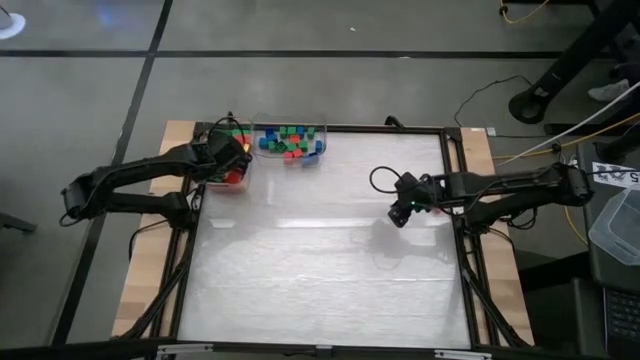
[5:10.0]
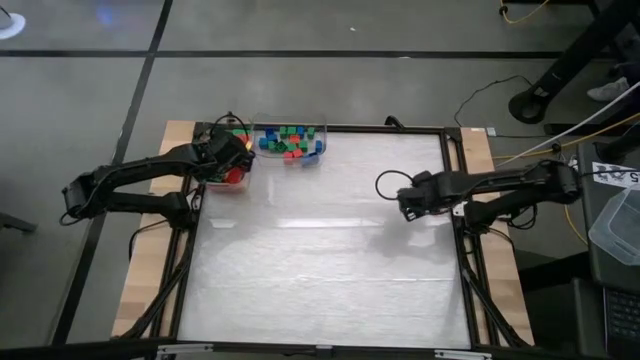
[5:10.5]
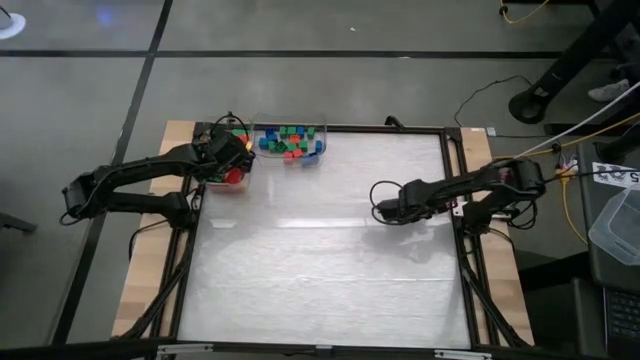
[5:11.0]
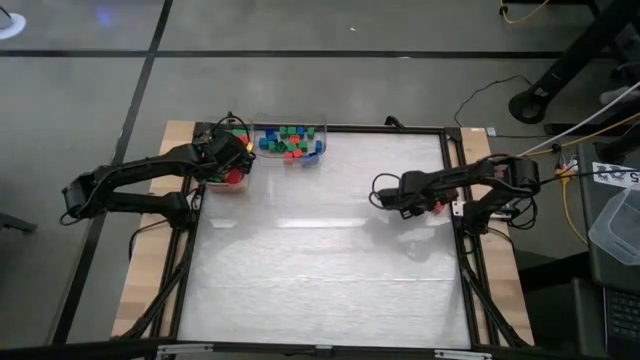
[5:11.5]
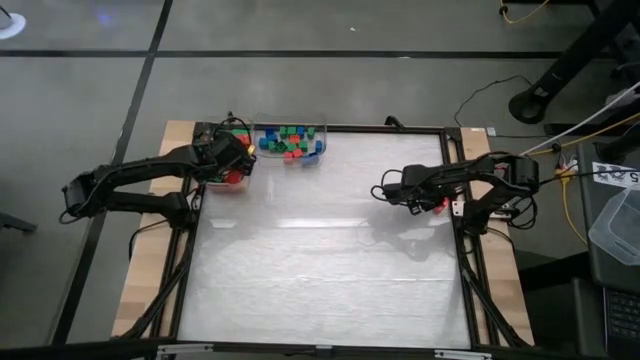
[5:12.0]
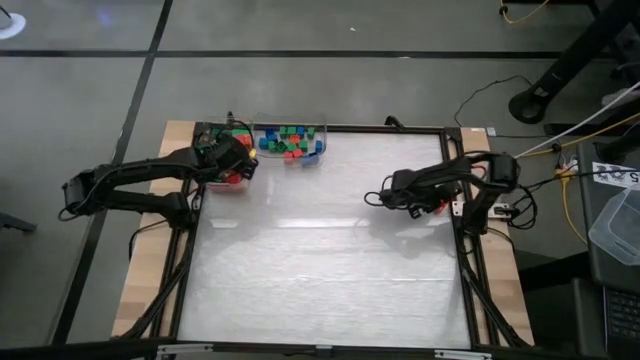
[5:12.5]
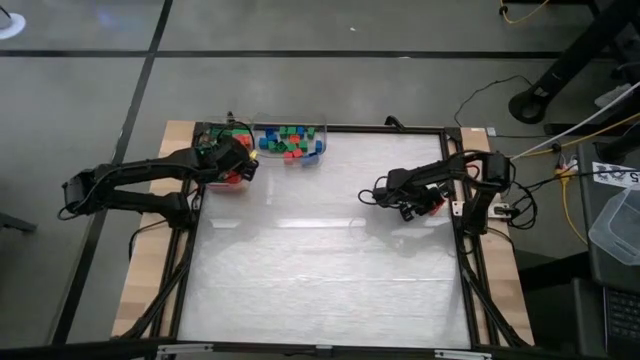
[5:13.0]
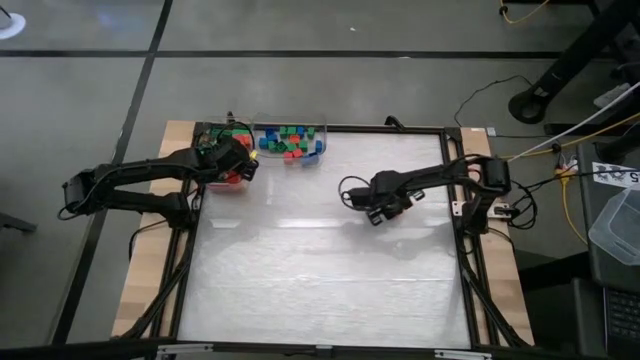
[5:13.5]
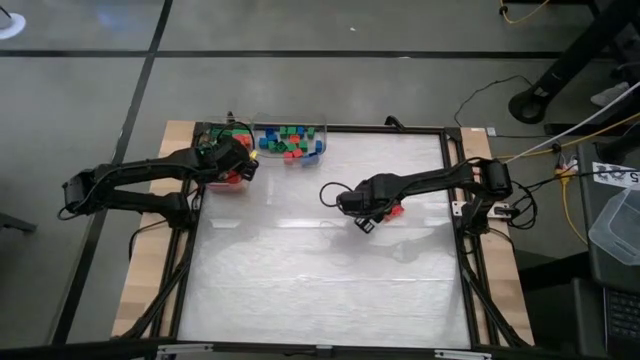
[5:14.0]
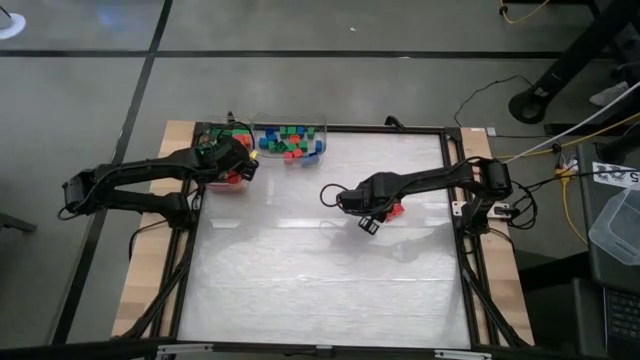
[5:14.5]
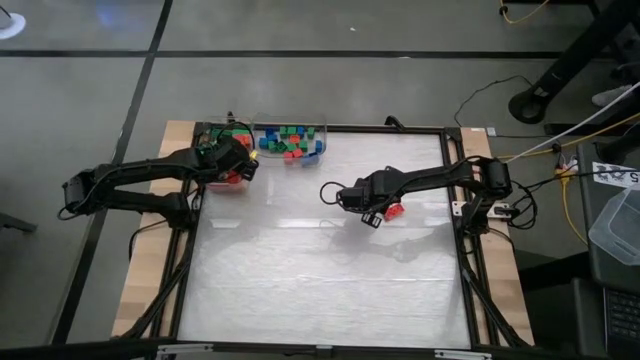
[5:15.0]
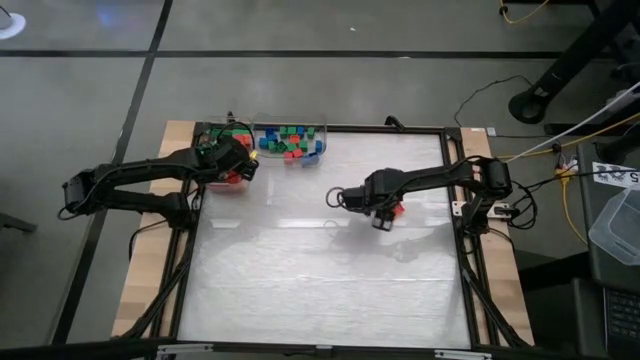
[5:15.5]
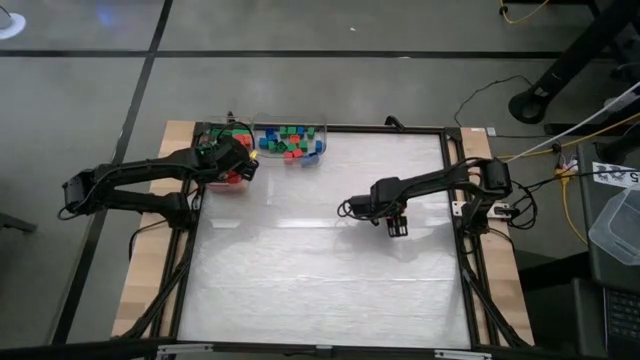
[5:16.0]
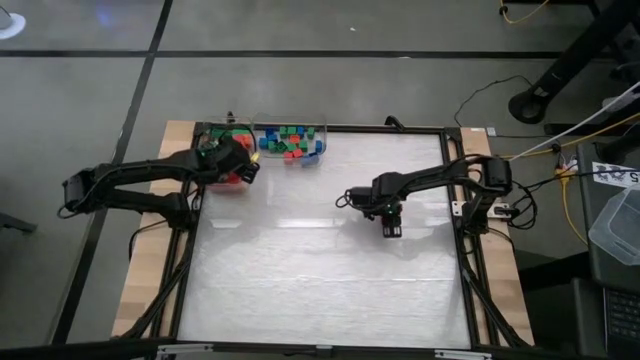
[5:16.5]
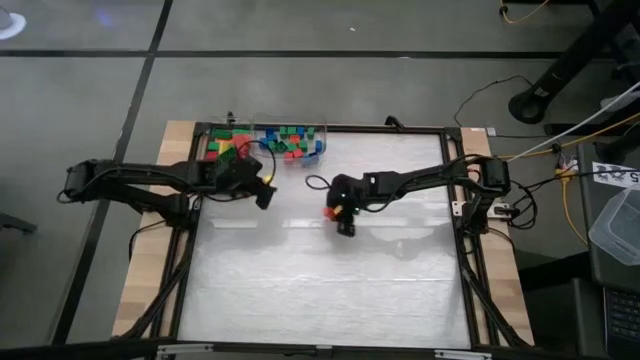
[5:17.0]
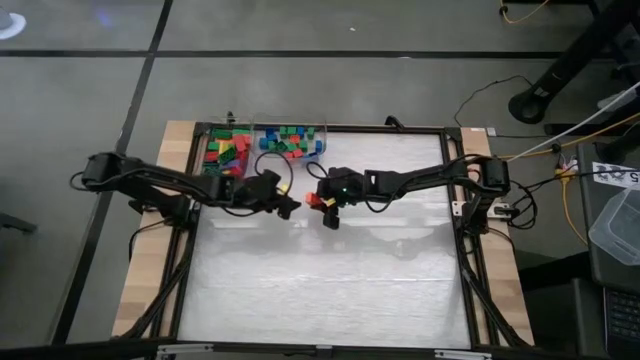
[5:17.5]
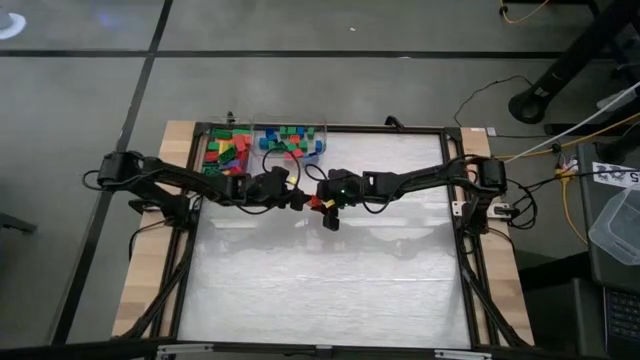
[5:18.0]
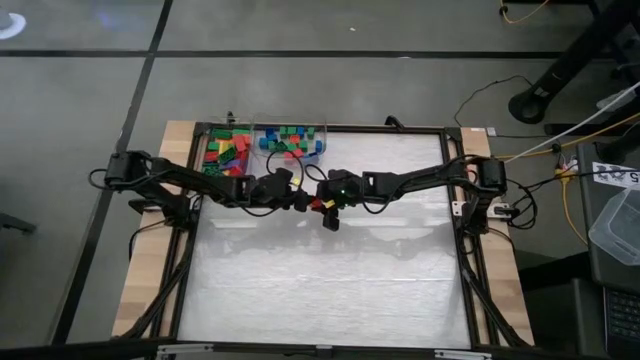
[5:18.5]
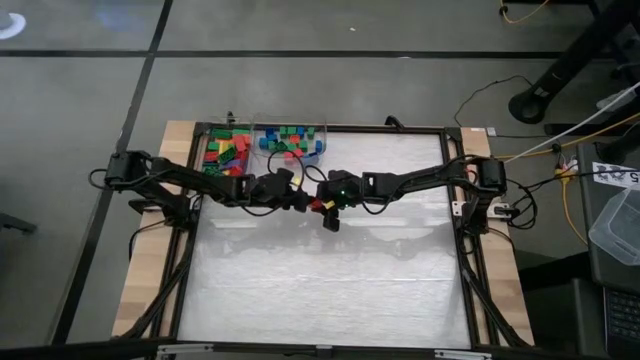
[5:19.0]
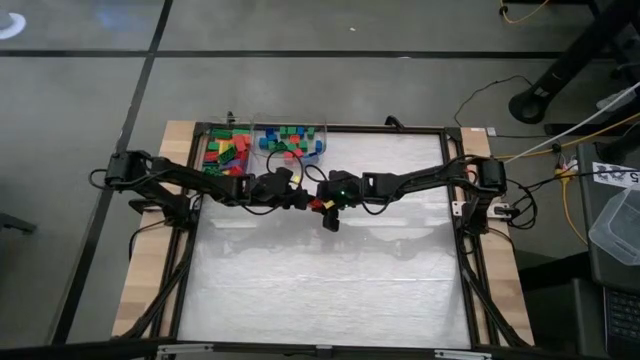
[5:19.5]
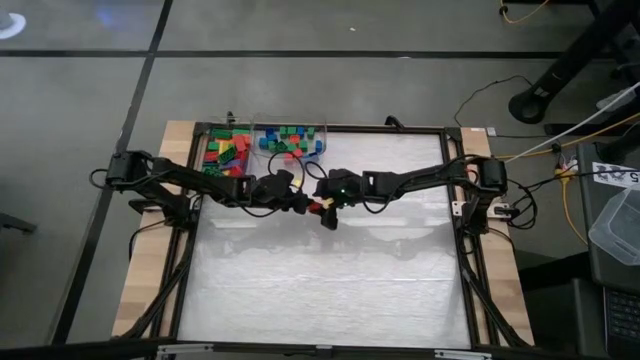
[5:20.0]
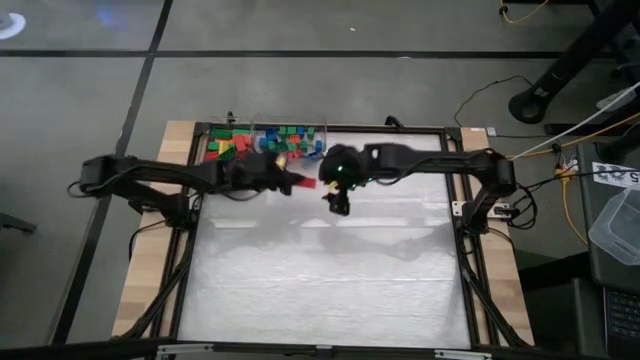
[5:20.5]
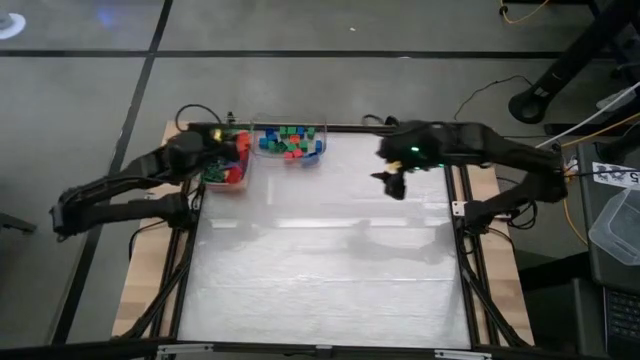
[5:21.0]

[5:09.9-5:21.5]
Task: Sort blocks by size
Put the large orange game piece into the left transparent bin

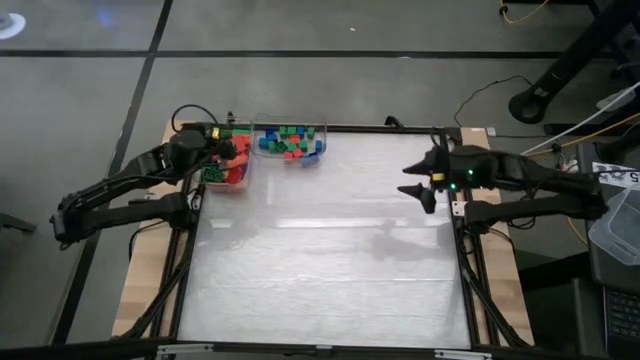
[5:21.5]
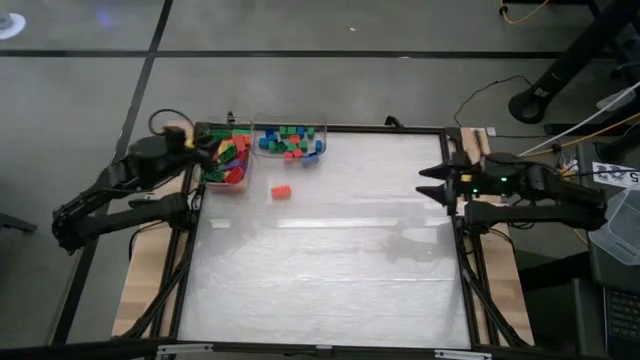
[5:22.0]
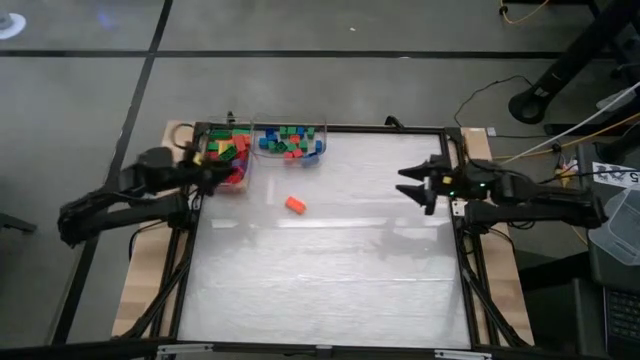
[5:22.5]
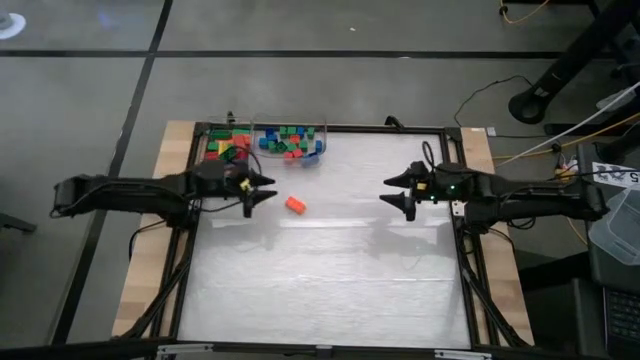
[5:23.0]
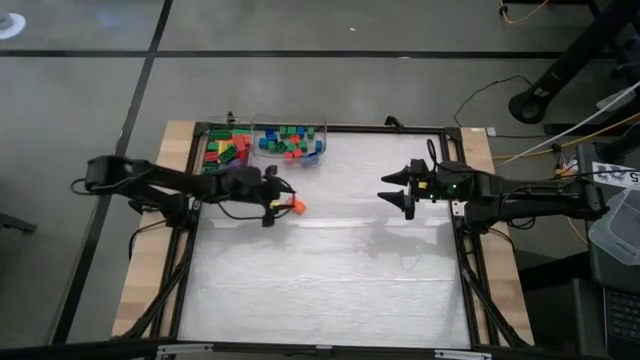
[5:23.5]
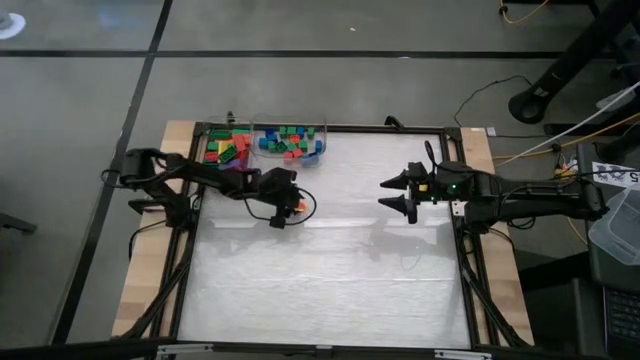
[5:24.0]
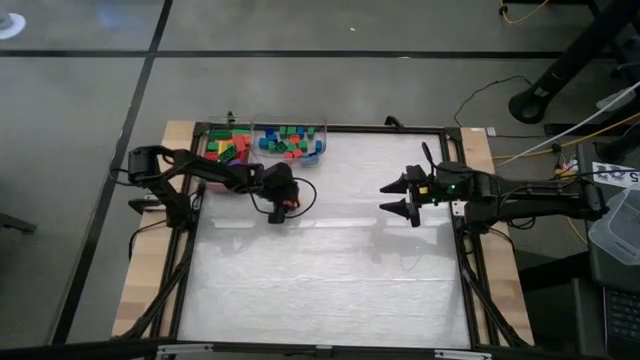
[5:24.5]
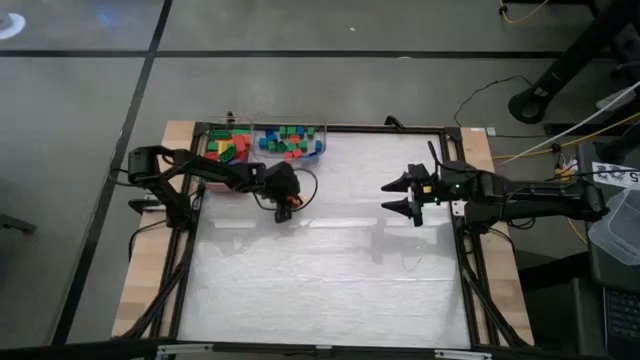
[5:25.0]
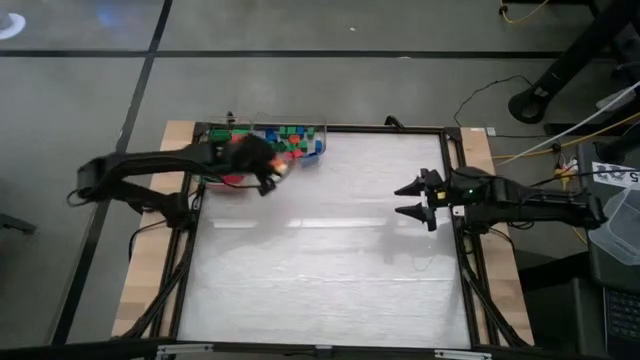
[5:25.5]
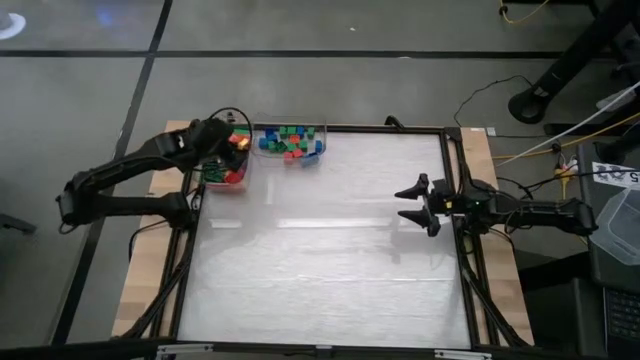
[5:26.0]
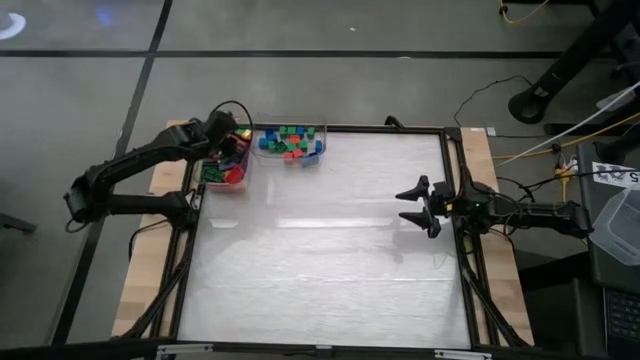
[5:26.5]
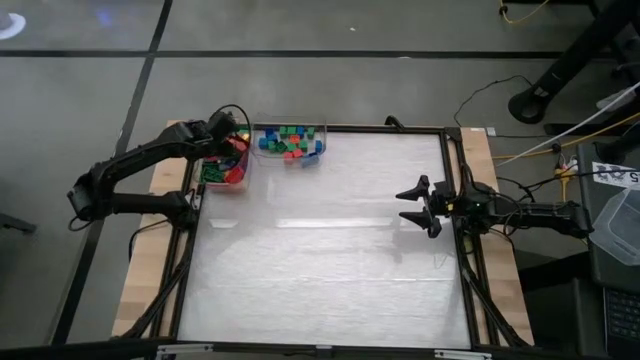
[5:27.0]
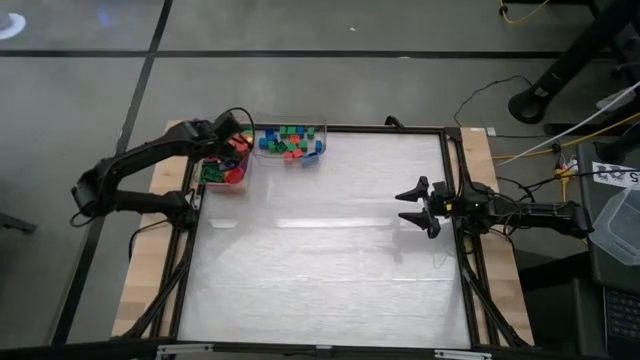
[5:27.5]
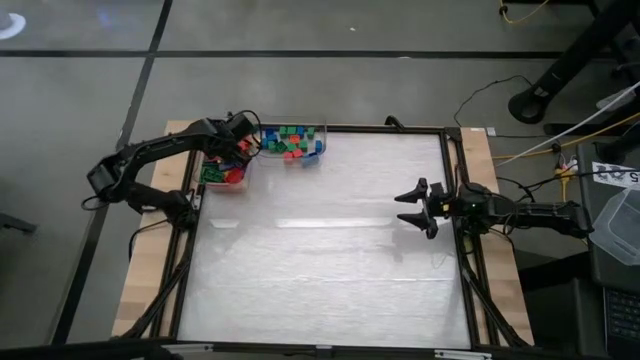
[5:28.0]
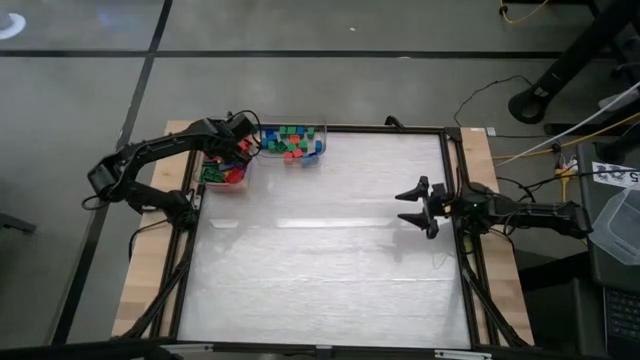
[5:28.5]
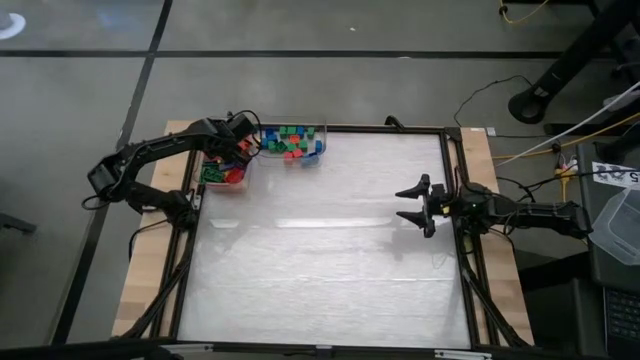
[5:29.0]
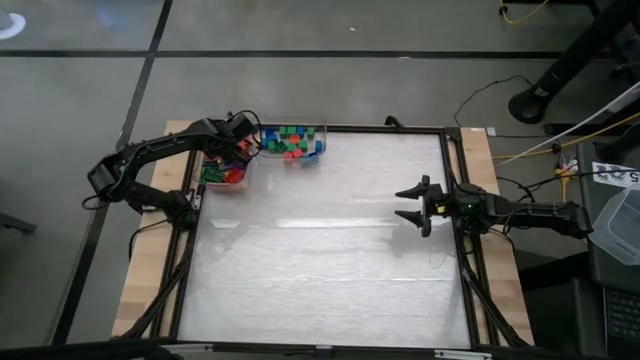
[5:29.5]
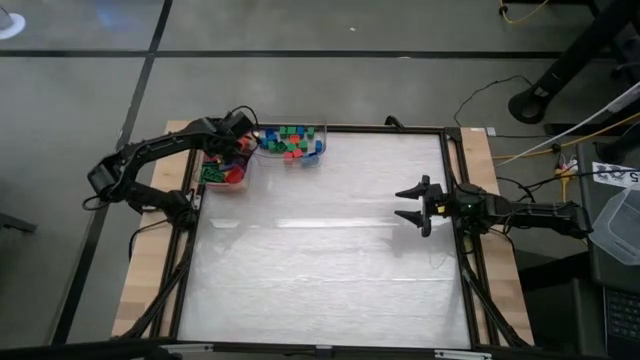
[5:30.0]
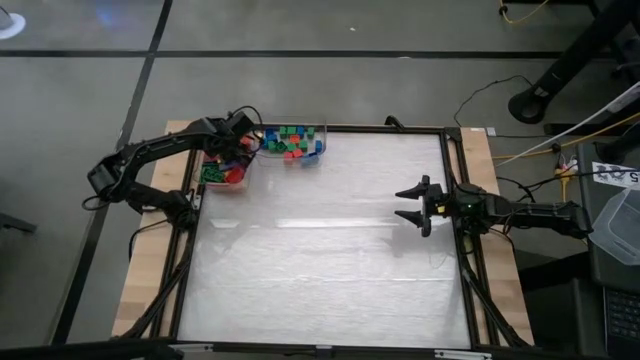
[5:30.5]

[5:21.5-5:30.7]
Put the large orange game piece into the left transparent bin

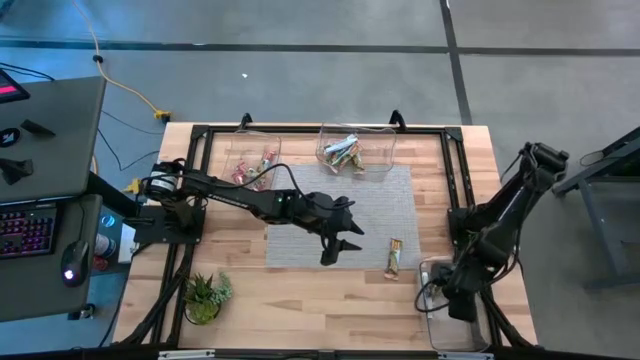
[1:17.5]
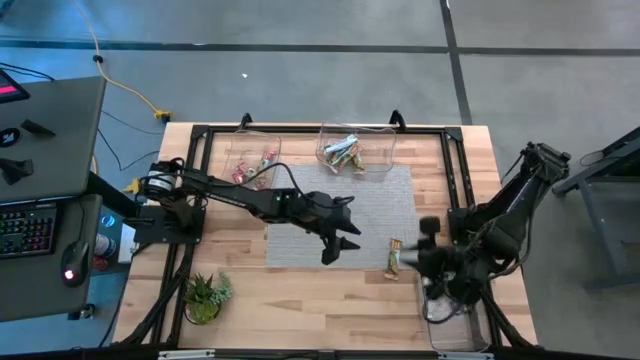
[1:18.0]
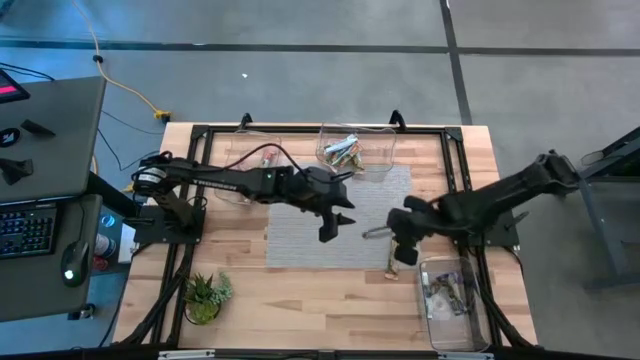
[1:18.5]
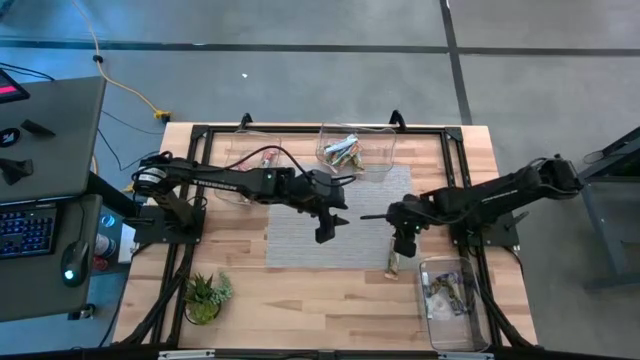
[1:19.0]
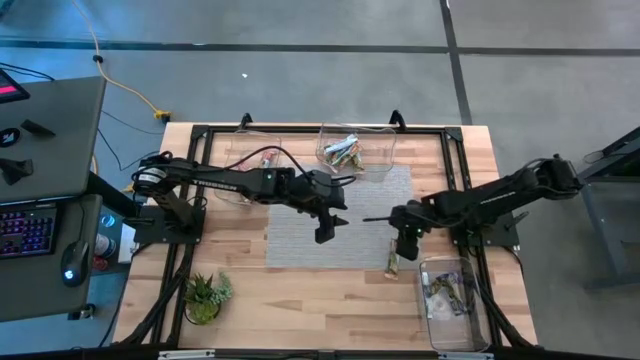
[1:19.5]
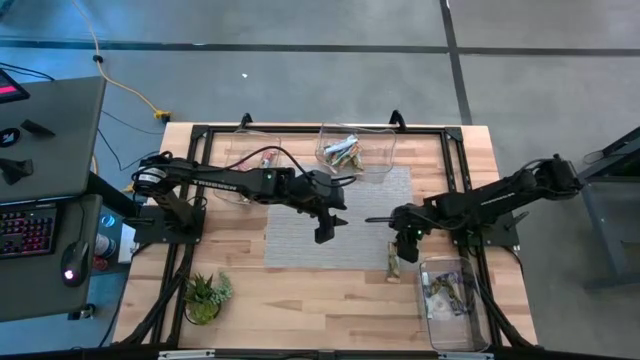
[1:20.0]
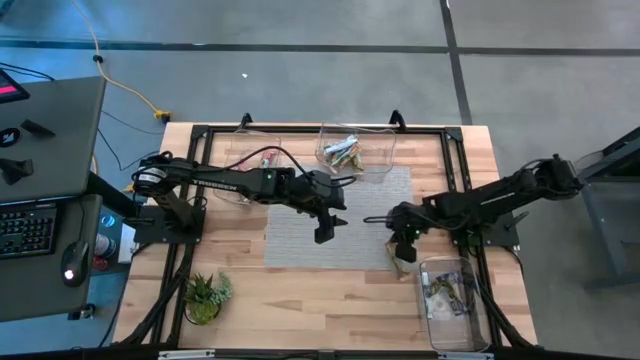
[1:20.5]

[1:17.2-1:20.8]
Task: Pick and place Granola Bars by type
Put the yellow granola bar into the top right transparent bin
